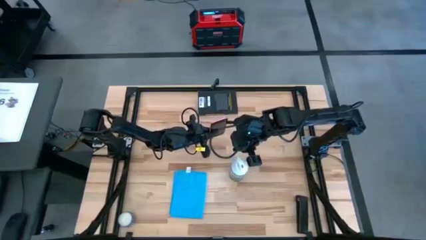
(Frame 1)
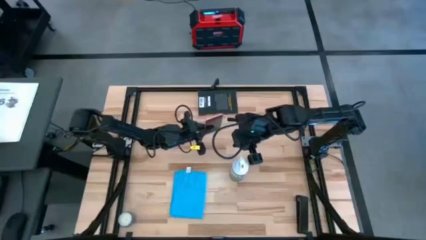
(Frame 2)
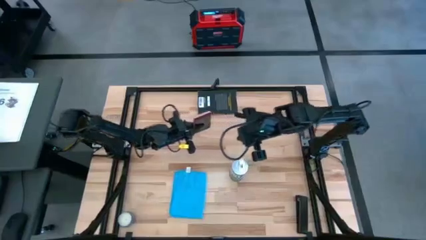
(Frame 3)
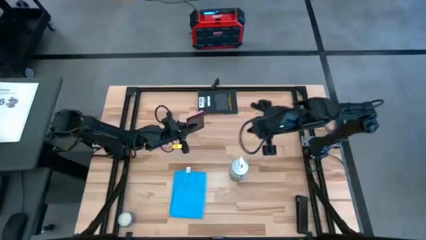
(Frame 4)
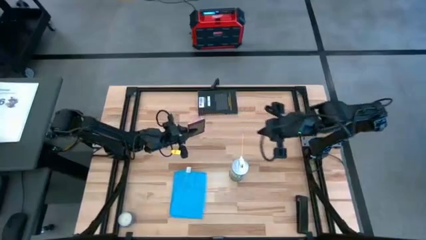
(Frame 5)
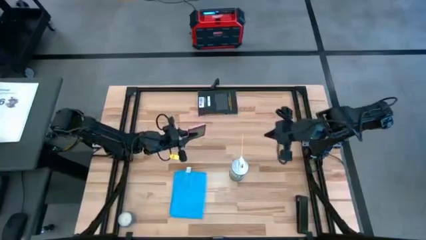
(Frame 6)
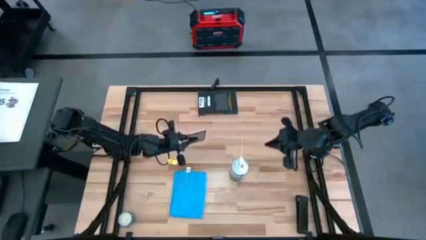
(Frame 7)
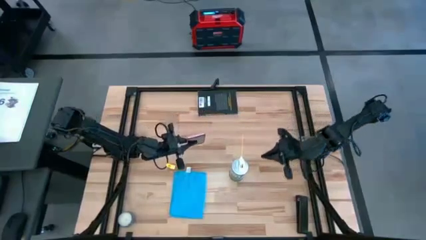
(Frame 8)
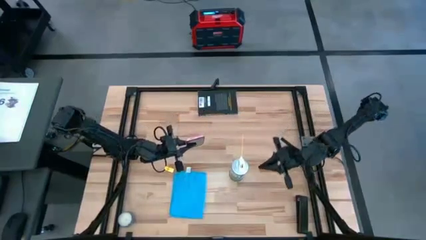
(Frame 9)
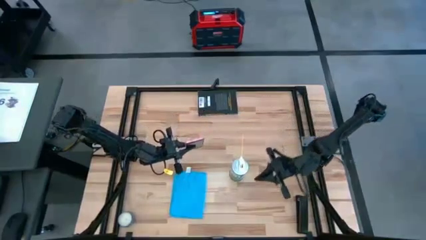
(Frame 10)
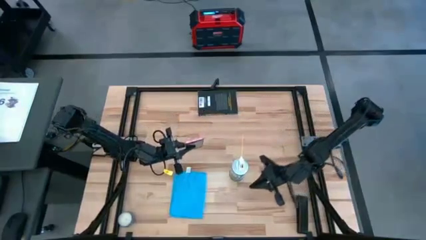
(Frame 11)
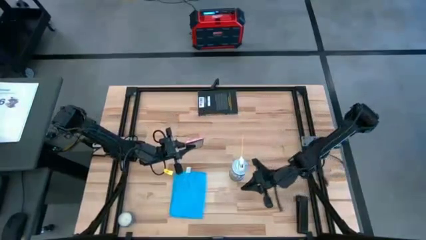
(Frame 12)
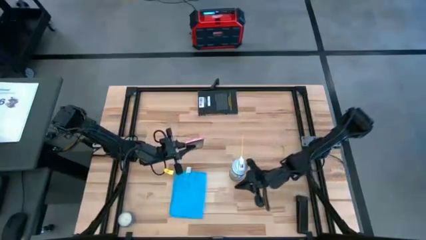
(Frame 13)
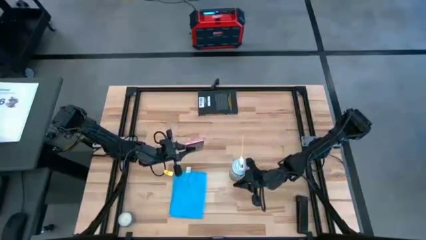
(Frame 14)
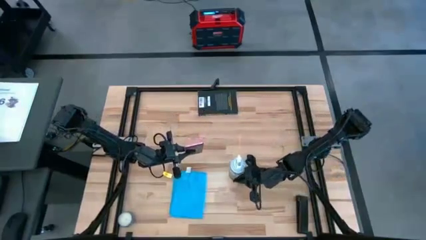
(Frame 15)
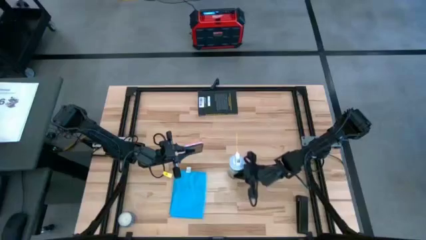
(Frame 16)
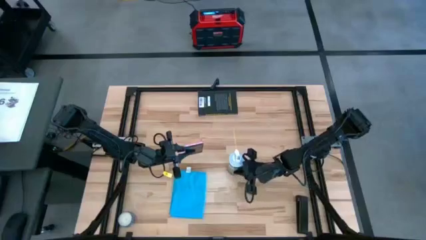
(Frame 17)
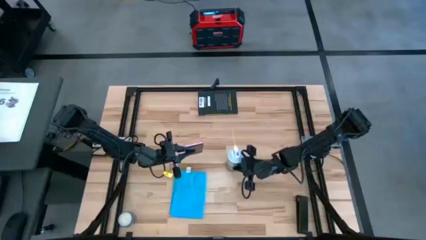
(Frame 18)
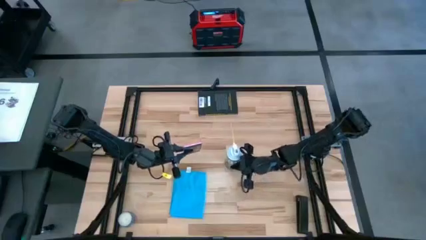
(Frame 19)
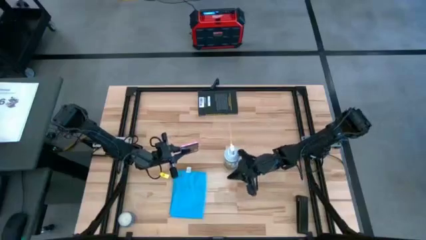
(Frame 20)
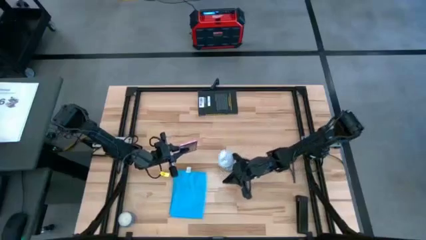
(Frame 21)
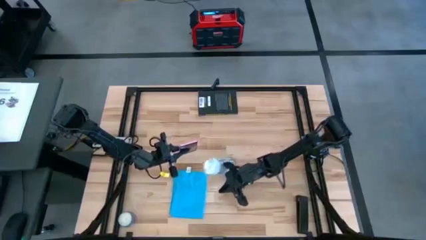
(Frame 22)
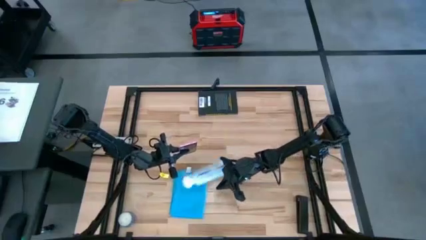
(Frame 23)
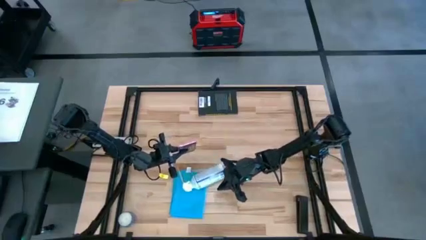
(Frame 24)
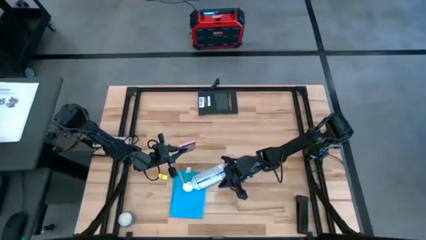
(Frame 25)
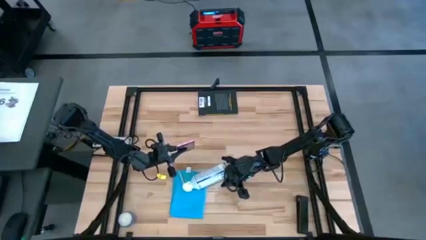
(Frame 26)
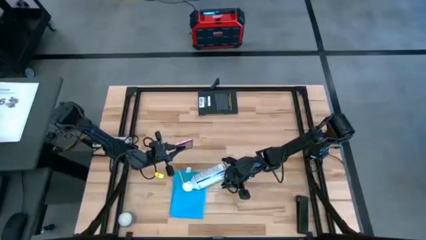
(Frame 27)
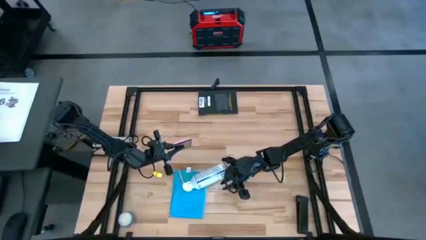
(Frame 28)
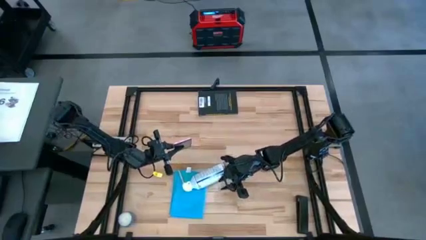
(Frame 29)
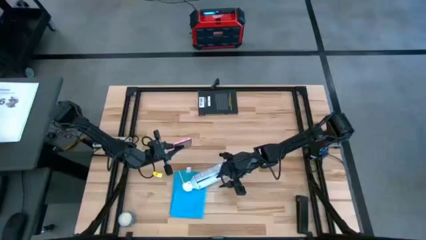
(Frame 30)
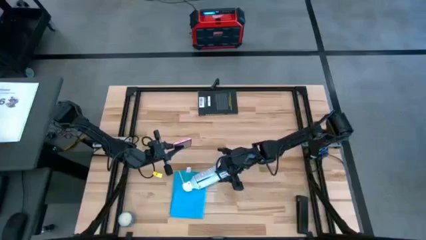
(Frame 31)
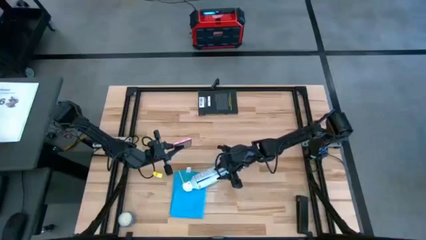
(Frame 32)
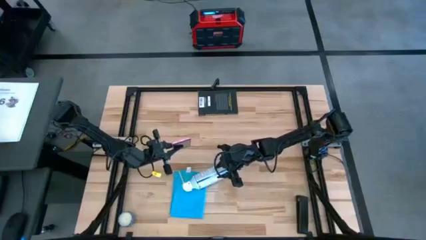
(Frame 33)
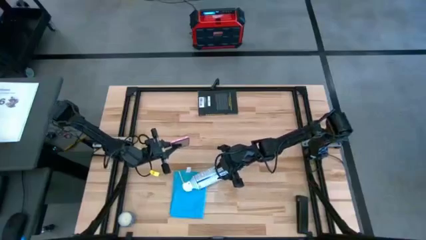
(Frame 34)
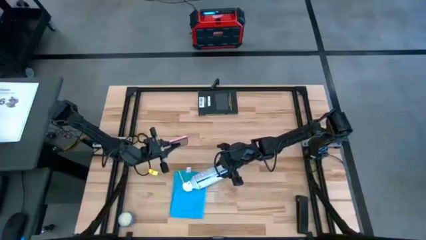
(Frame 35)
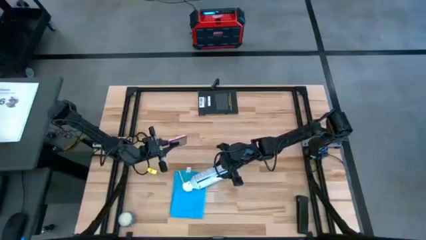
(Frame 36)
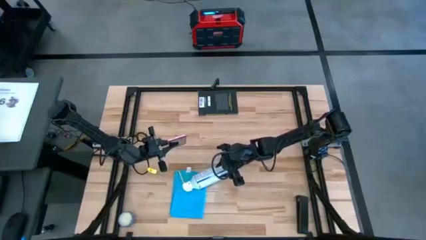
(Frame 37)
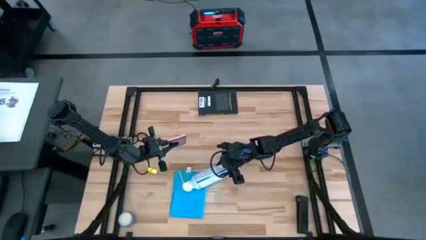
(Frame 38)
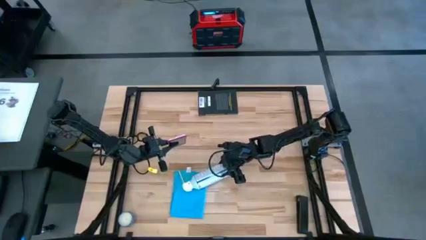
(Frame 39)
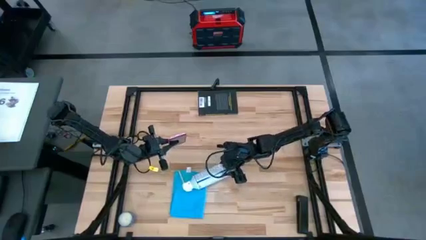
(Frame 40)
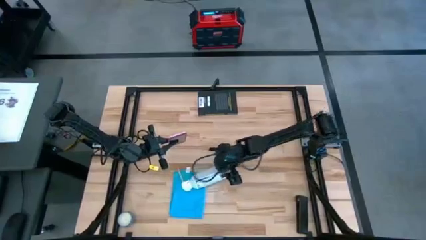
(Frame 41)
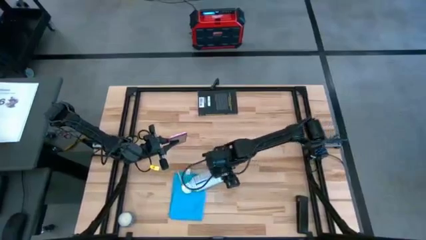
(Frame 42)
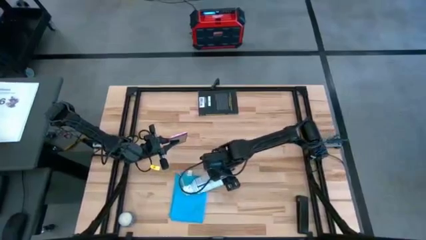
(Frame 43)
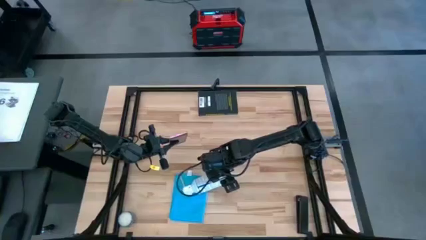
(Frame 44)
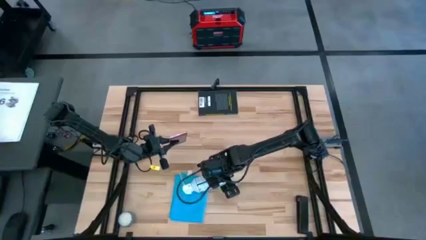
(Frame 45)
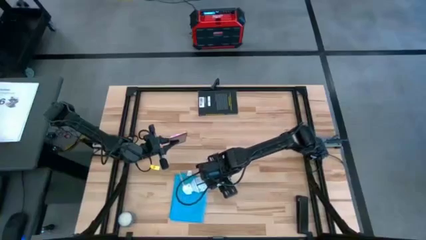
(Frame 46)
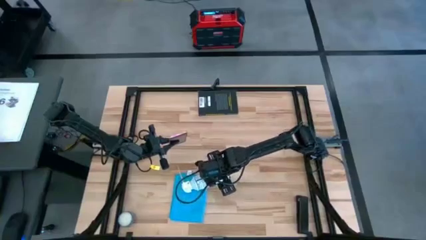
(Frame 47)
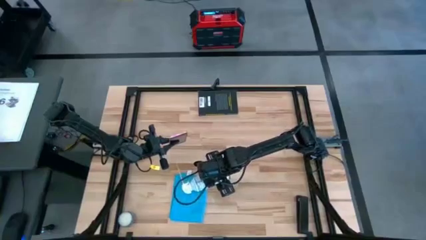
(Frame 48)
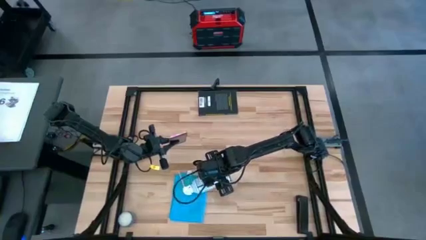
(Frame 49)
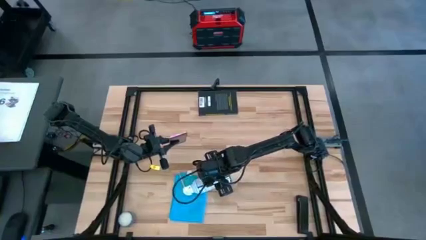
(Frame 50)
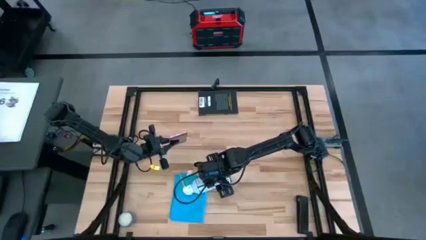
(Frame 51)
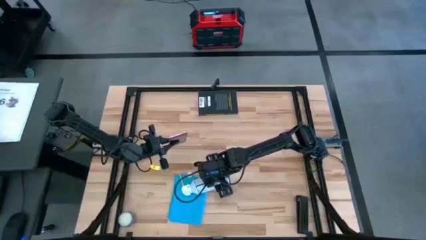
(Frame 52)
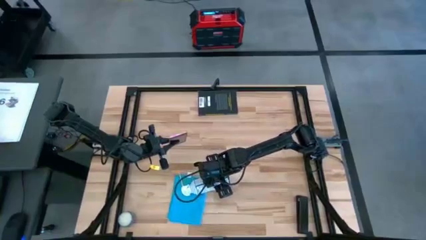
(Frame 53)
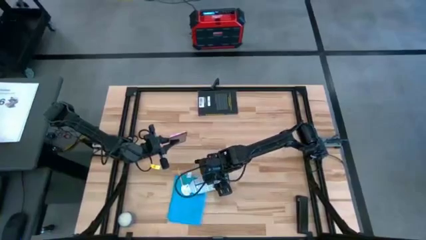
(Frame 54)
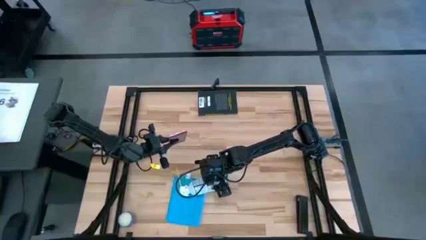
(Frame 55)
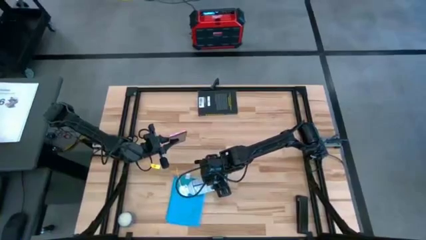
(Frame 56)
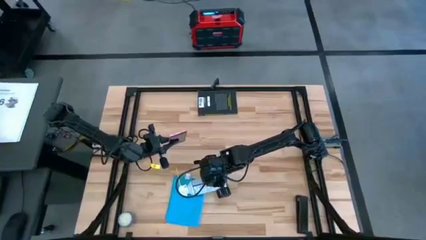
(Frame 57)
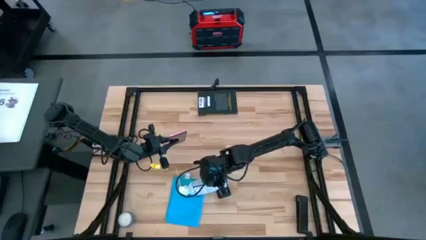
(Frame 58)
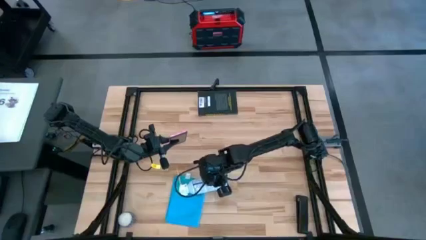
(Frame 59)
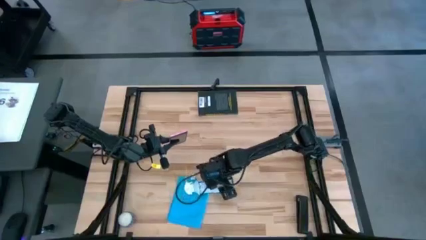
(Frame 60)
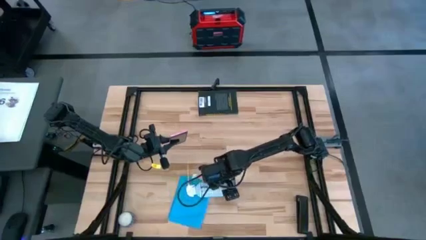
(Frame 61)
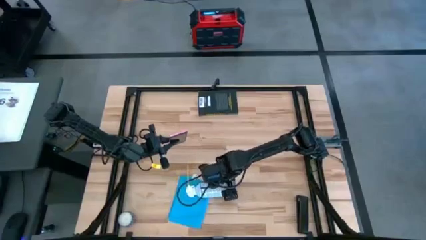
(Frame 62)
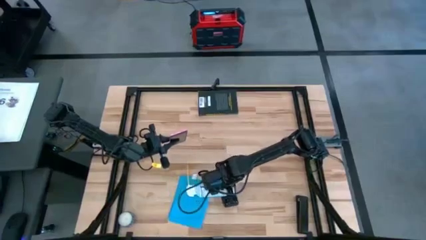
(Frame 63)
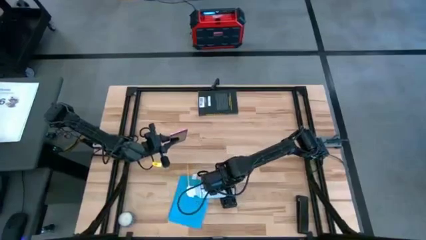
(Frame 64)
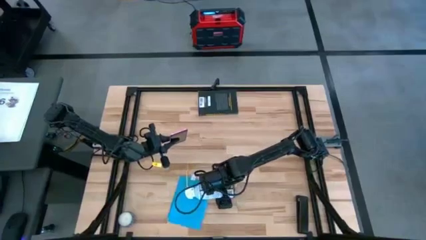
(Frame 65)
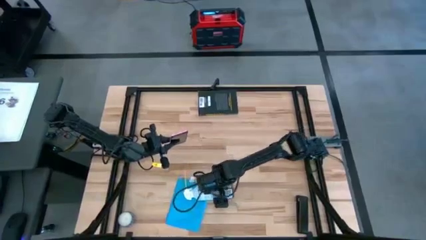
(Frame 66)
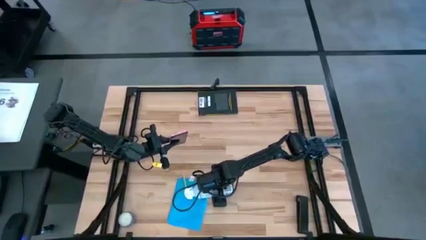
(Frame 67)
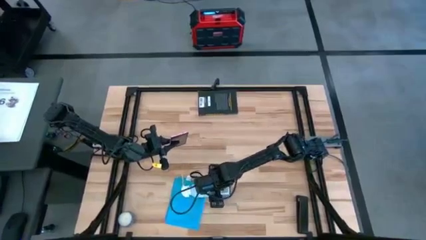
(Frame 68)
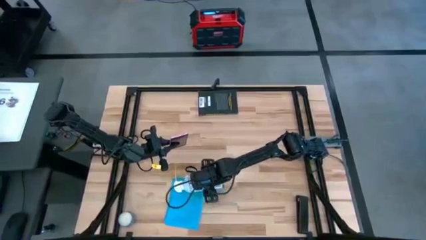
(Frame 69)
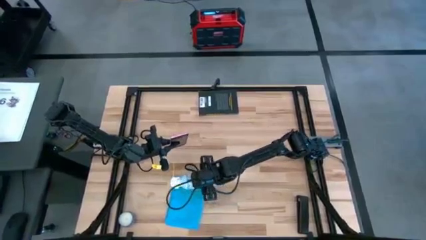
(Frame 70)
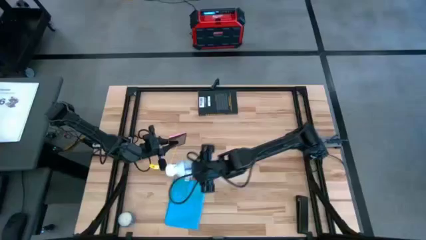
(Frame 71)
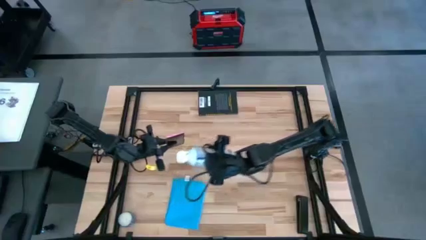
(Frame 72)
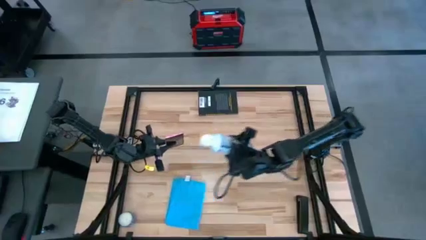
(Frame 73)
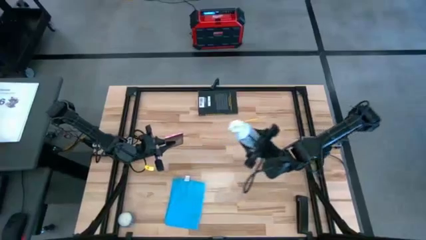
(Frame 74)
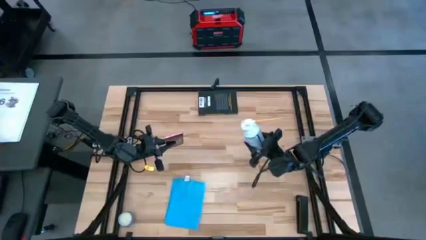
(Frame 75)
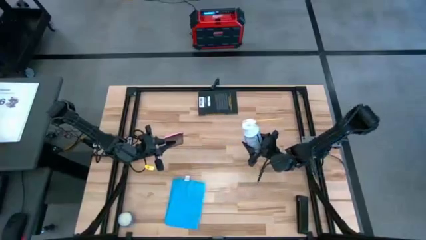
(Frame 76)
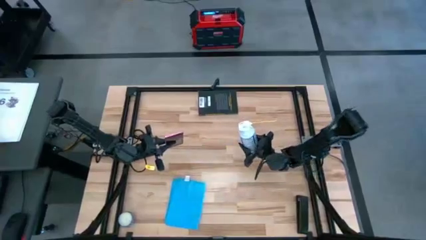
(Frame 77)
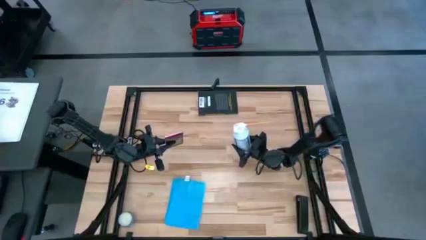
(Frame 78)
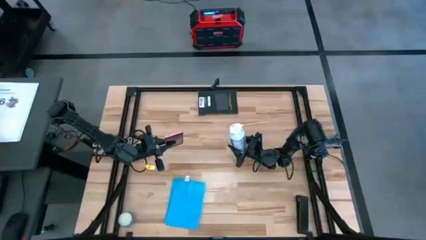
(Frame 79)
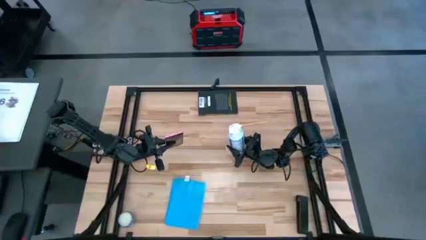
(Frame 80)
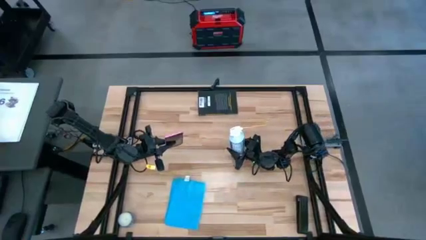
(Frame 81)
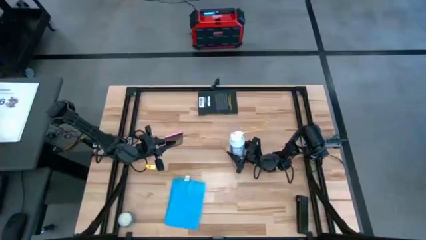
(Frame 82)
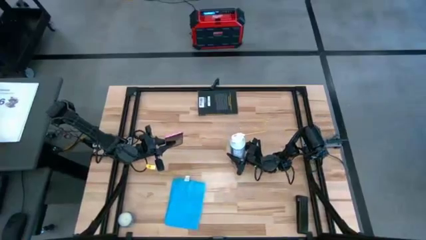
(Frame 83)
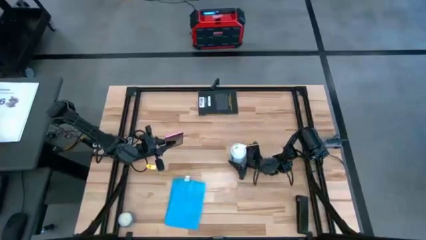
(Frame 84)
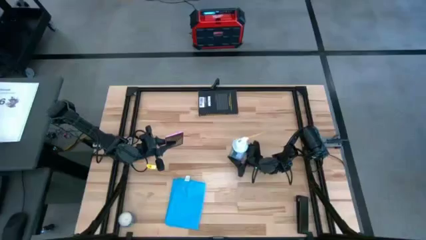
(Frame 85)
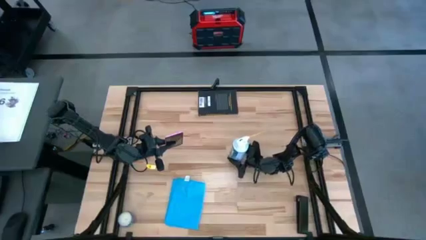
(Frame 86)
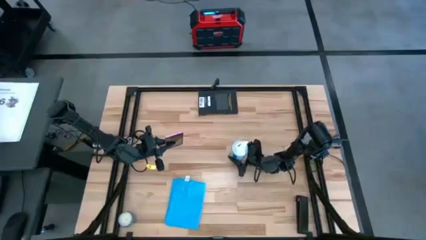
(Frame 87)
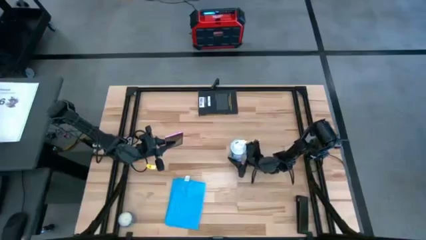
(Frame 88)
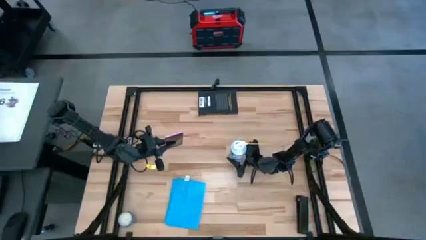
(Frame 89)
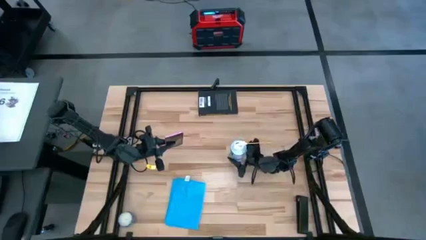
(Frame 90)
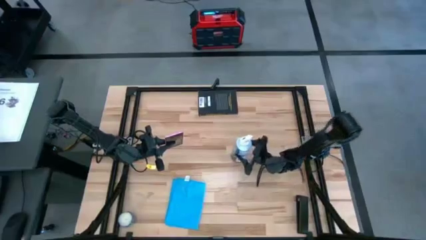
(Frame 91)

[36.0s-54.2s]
Task: Apply microfiber cloth
Adjust the spray bottle on the table
